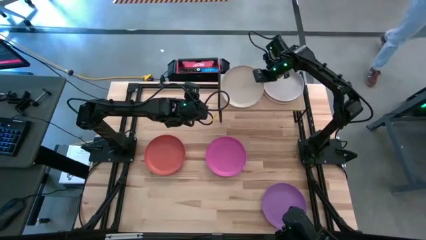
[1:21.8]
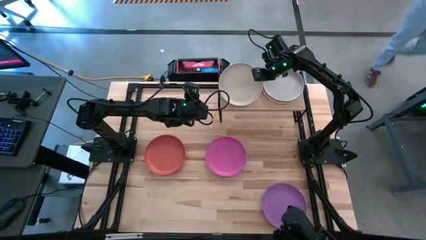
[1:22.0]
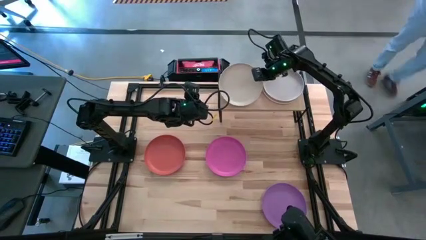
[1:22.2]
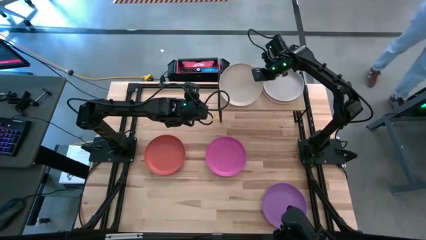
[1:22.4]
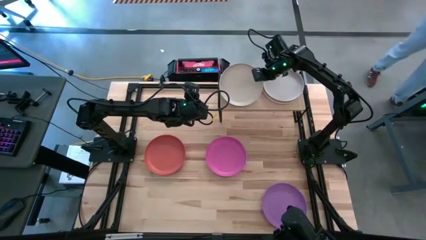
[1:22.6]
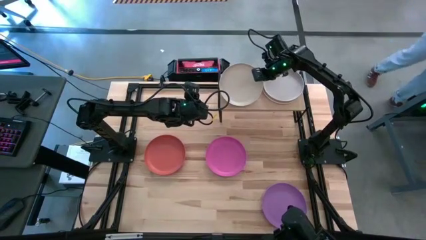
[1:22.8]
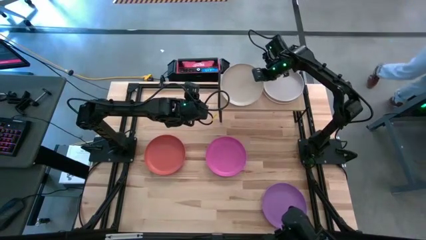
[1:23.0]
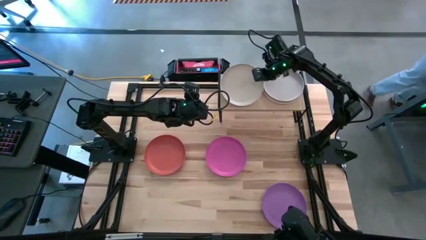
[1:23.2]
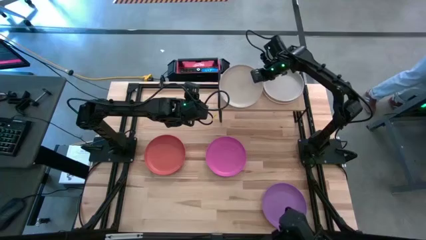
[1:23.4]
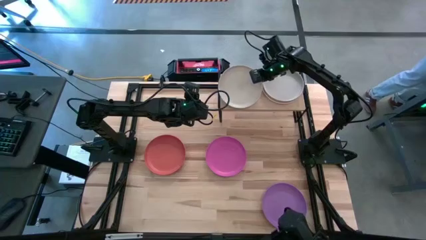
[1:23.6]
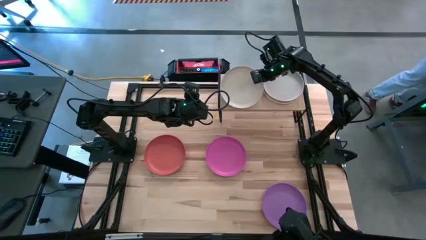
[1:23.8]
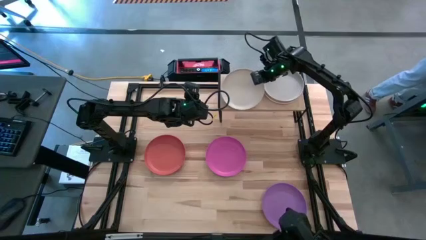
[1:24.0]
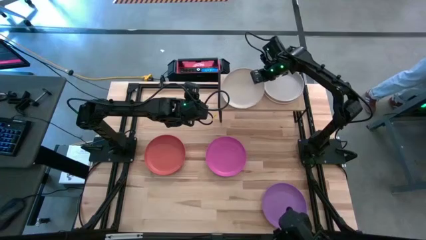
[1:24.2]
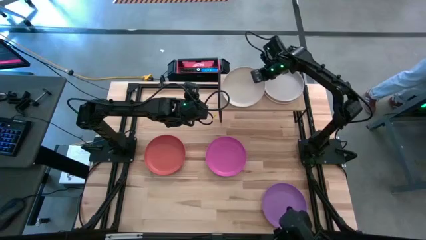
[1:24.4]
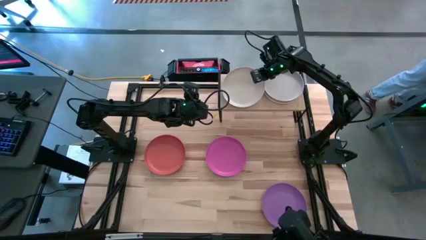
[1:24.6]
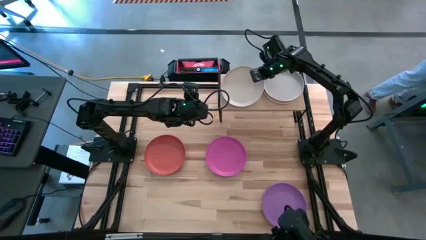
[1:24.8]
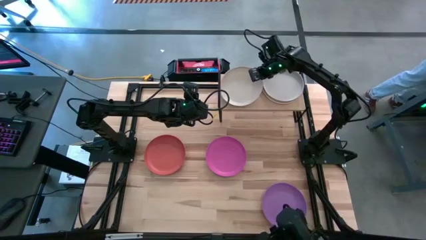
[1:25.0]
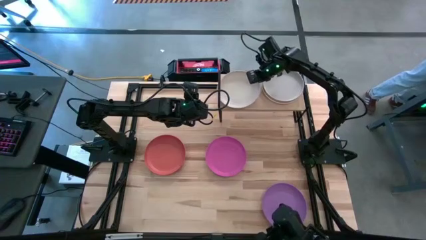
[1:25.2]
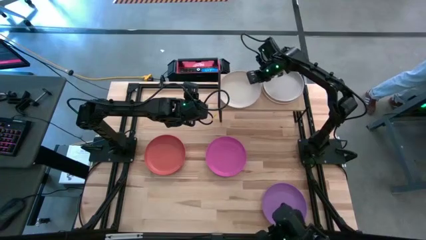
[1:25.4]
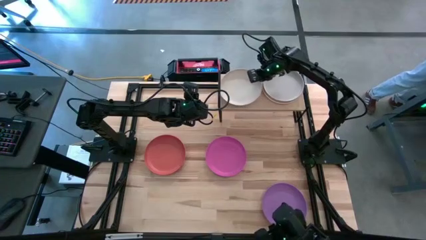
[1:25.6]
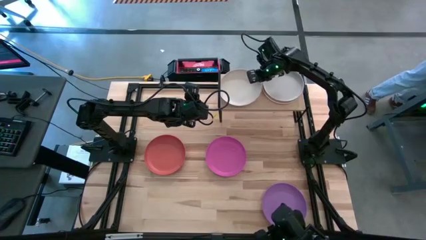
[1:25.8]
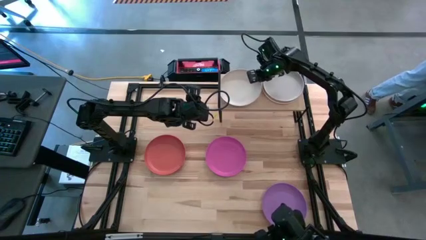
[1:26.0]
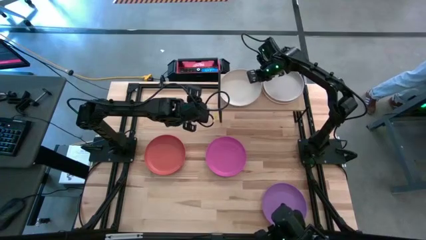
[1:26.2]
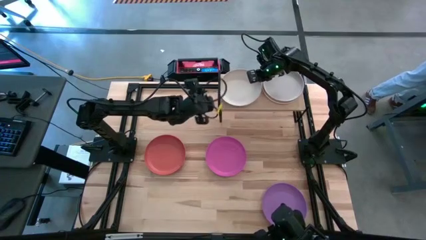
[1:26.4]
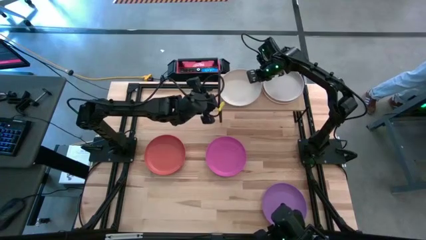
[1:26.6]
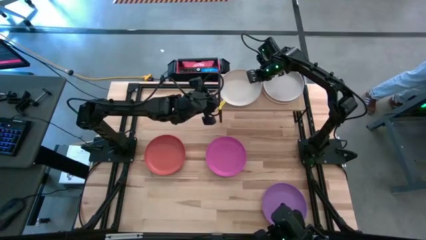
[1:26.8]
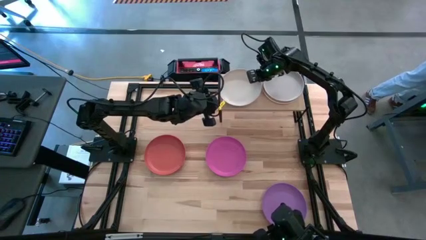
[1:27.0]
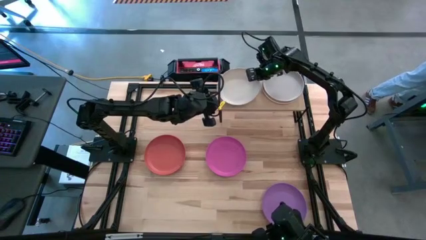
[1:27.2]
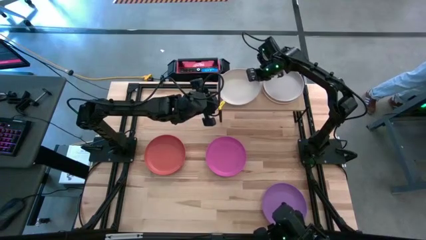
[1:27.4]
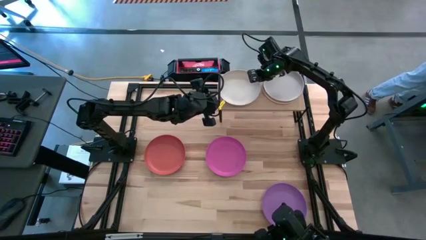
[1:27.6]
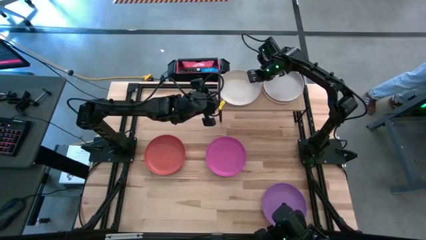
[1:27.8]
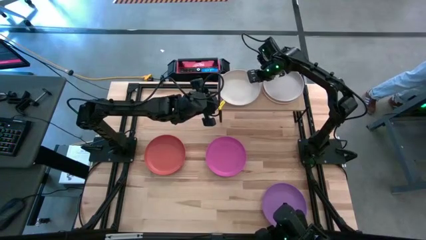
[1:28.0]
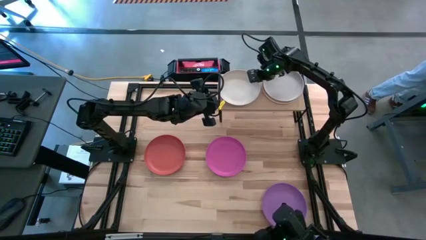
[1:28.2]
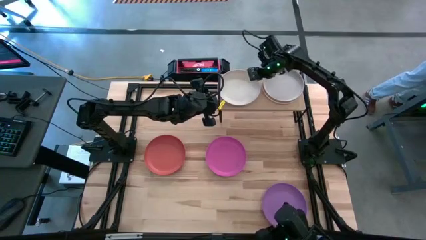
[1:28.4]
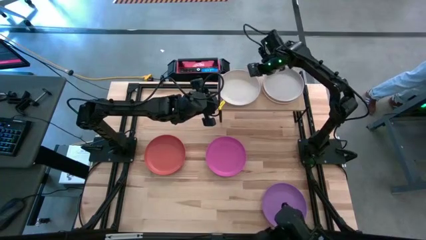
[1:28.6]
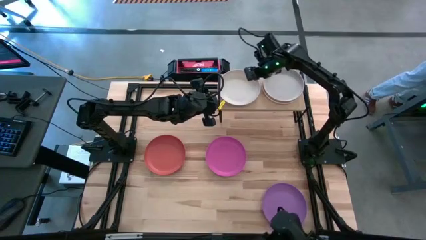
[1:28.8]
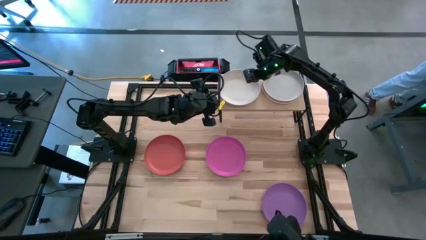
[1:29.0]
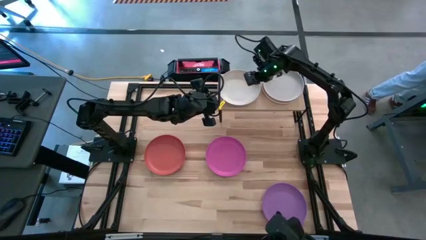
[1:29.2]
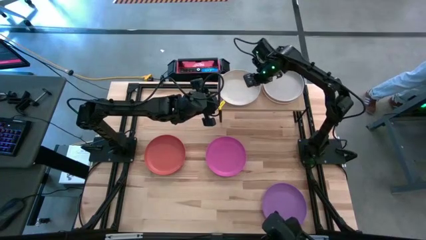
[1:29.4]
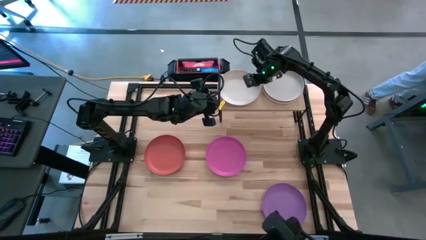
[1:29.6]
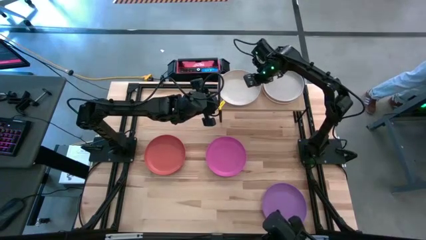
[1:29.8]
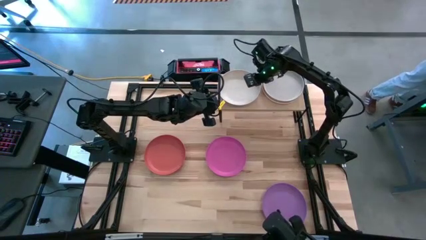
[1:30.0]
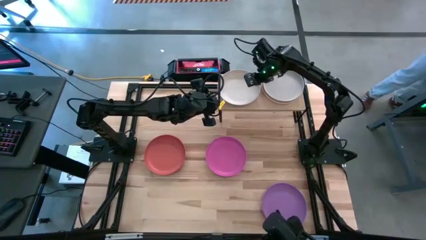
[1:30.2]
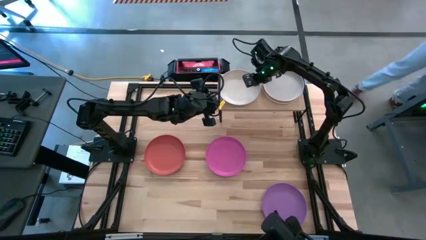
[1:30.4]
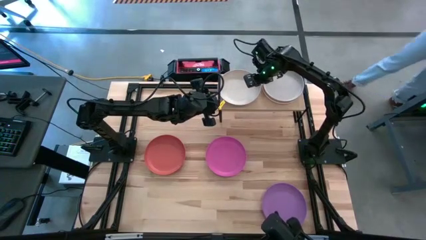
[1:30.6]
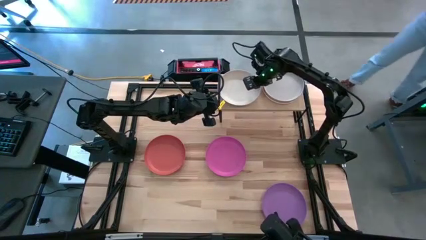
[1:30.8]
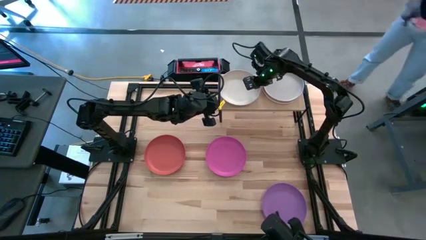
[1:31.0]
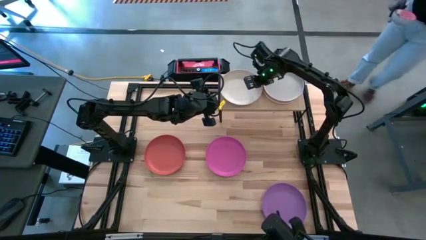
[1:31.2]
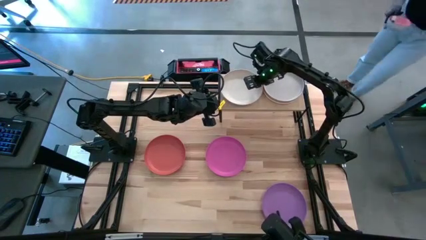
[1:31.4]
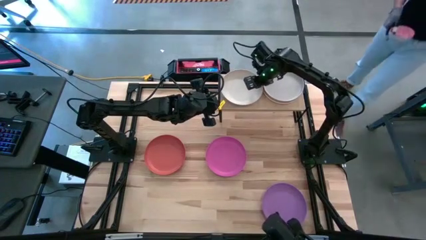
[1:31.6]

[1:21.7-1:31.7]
Task: Place and stack plates onto a shelf
Put the cream plate on the shelf

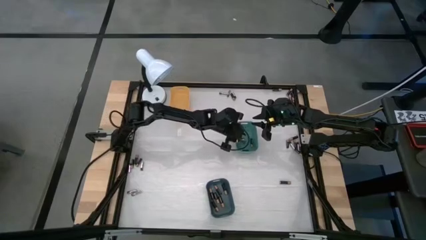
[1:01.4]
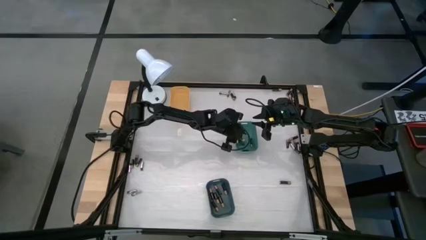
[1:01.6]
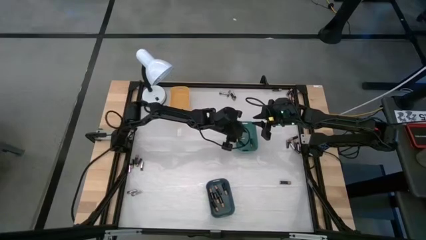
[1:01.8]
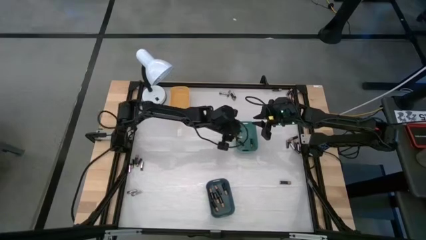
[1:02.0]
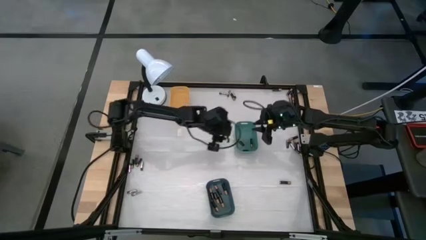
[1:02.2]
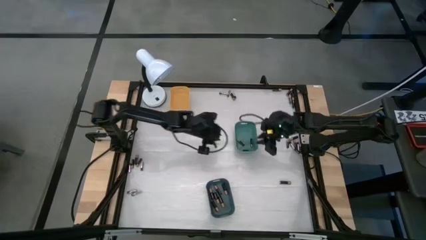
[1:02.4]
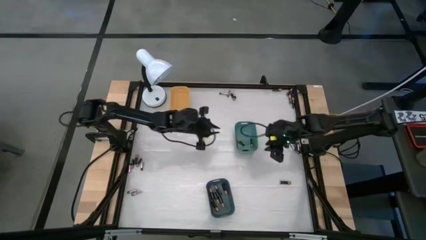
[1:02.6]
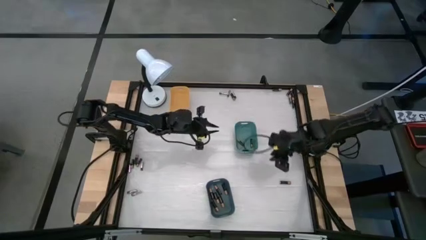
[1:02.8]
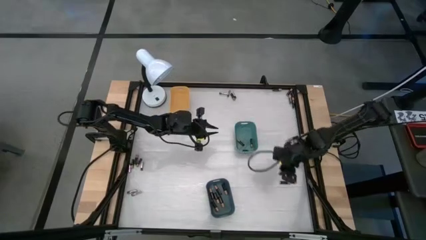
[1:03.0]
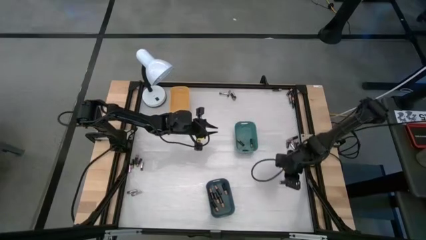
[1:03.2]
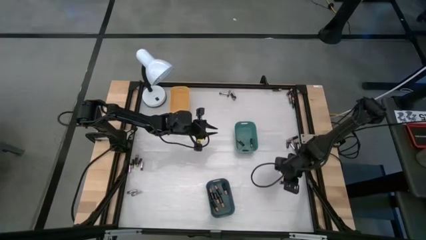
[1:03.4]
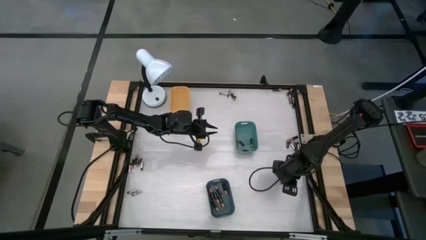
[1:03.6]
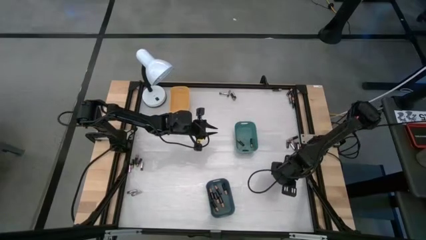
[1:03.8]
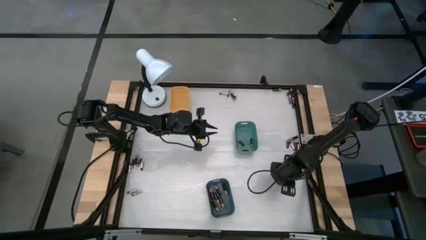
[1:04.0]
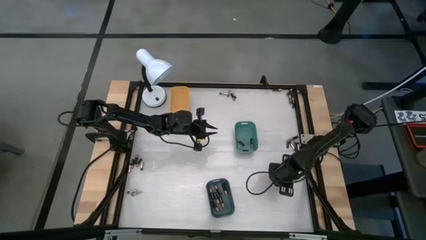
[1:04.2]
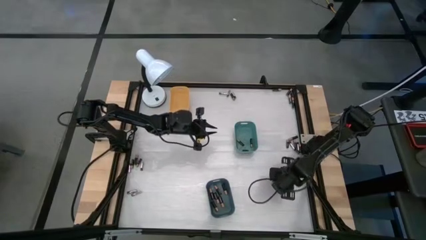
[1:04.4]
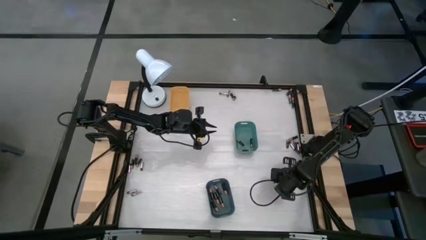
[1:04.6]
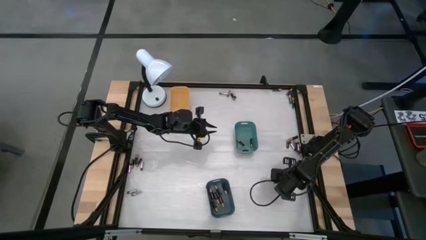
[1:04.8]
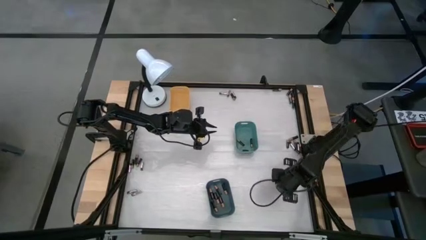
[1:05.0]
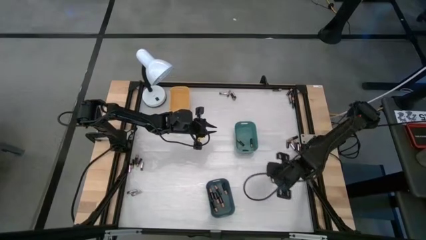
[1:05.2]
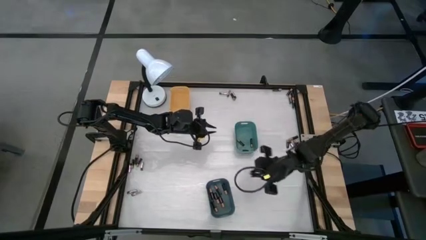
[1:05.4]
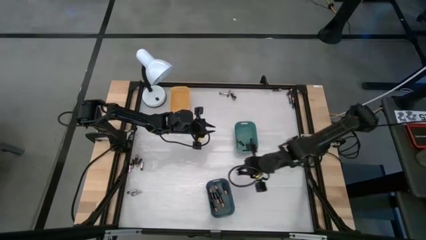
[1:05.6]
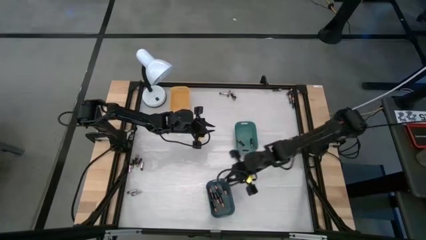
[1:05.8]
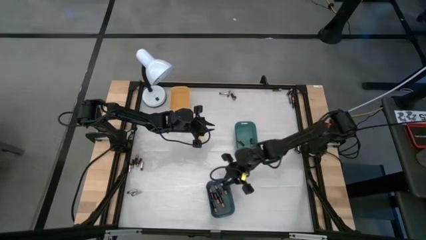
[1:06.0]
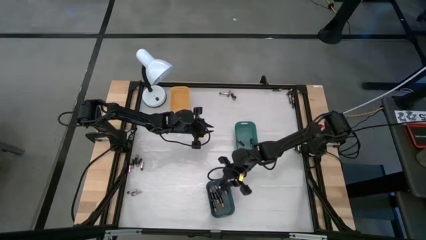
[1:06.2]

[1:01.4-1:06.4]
Task: Sort batteries
Put the black battery into the blue bin

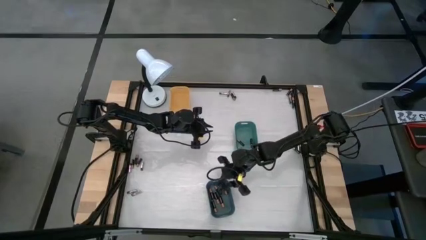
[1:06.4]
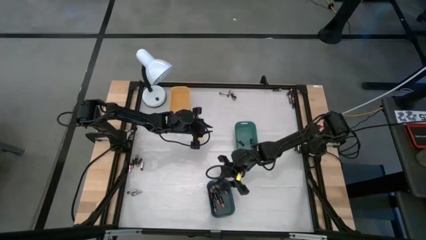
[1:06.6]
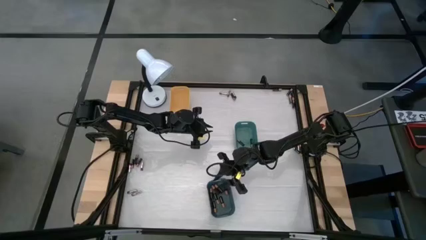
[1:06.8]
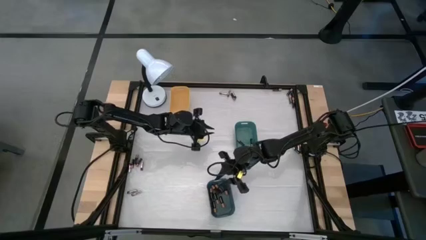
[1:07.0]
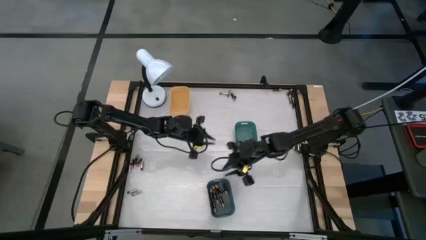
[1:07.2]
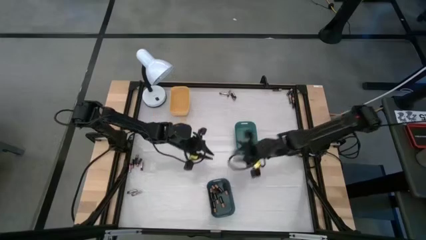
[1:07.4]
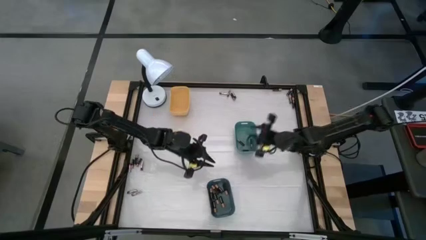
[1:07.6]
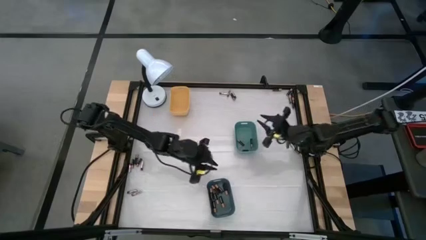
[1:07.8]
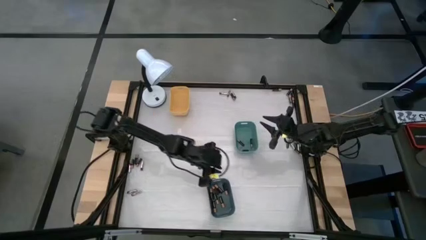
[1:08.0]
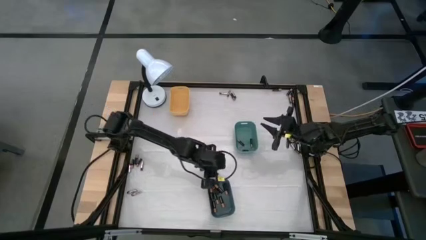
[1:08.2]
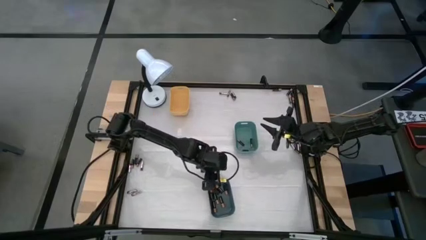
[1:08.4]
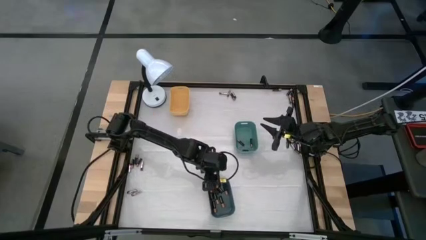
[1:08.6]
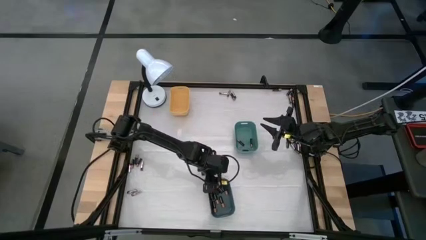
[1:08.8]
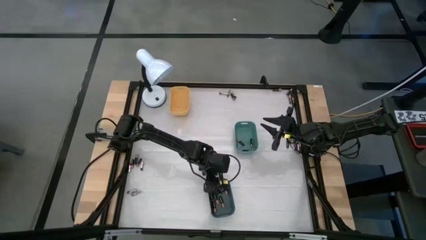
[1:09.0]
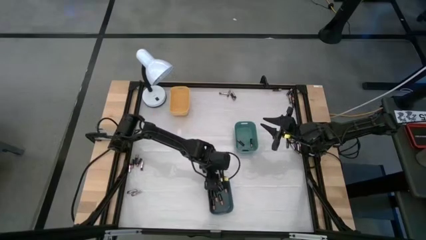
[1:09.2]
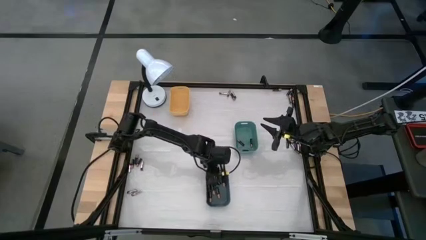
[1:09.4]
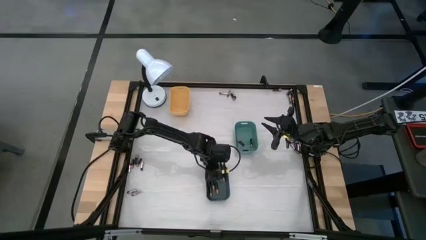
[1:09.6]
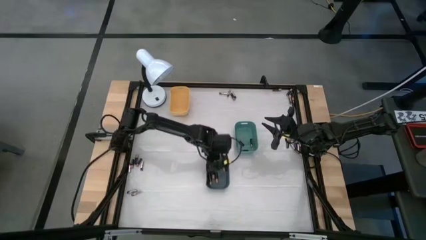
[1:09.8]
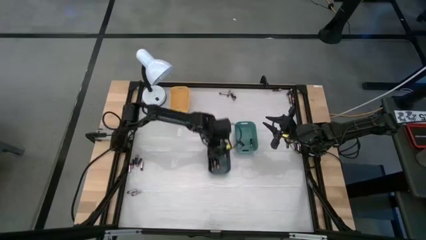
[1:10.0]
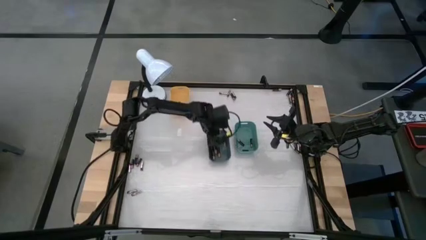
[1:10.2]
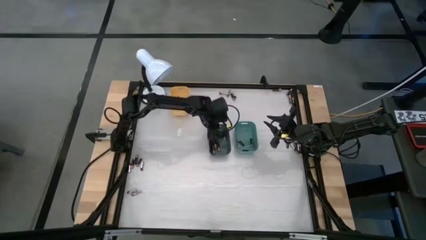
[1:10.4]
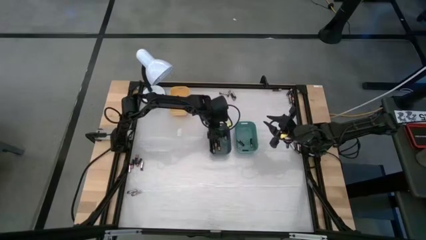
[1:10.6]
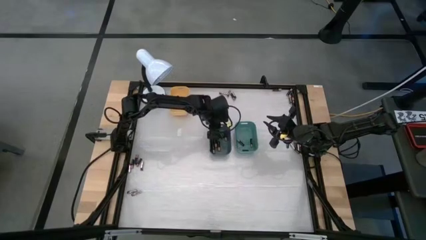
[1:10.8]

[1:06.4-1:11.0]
Move the blue bin to the center of the table
